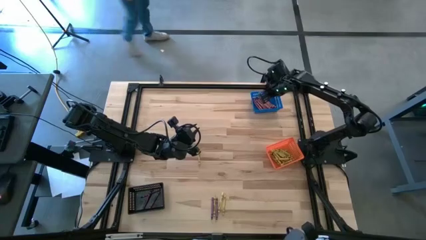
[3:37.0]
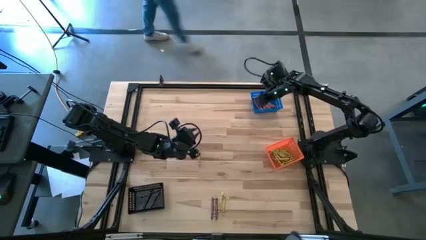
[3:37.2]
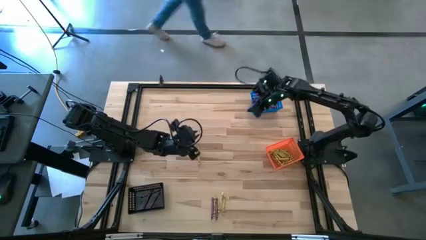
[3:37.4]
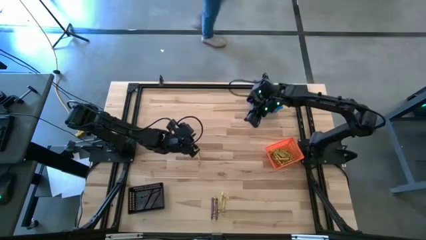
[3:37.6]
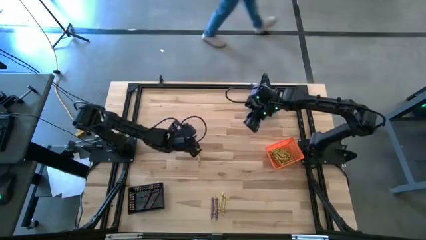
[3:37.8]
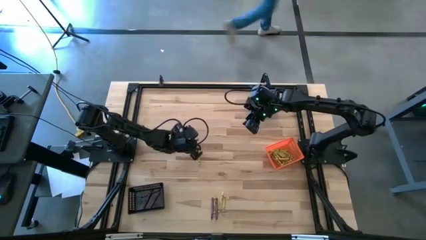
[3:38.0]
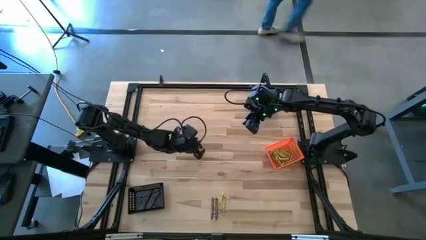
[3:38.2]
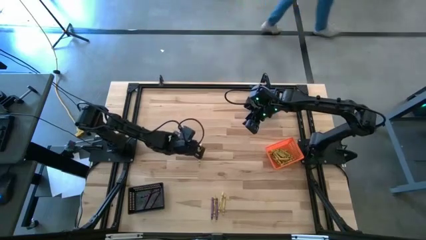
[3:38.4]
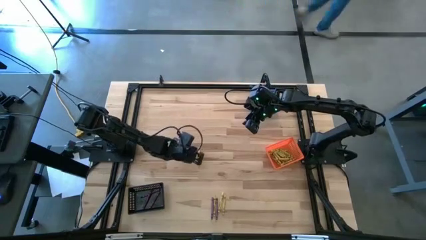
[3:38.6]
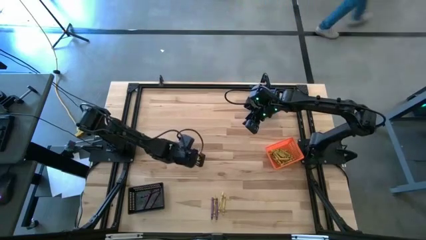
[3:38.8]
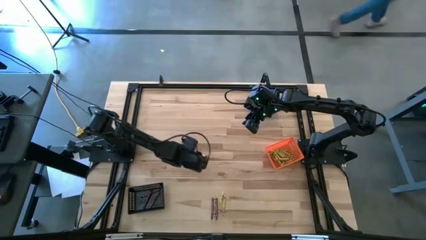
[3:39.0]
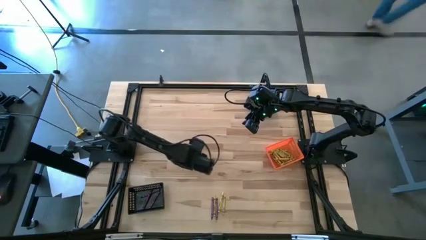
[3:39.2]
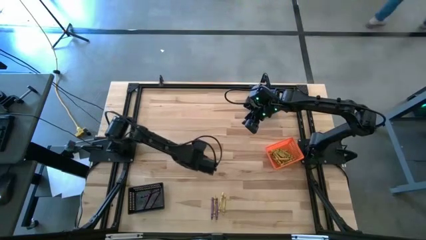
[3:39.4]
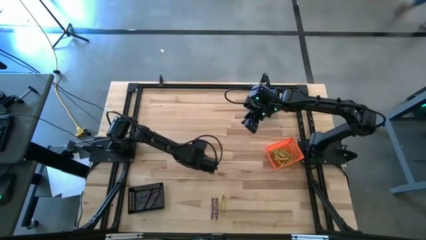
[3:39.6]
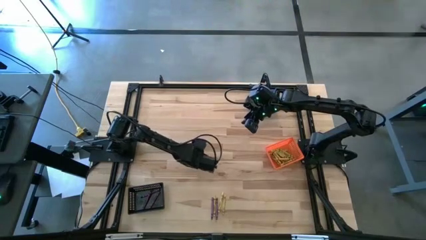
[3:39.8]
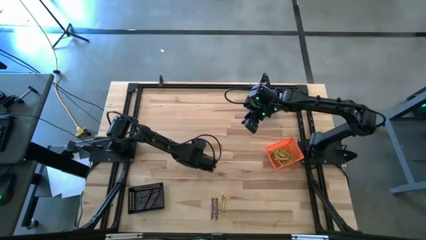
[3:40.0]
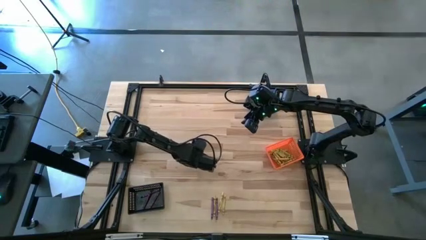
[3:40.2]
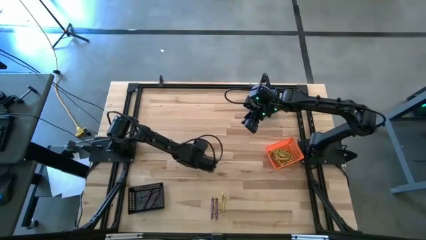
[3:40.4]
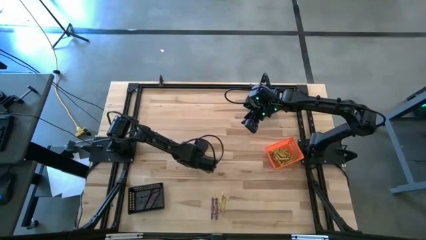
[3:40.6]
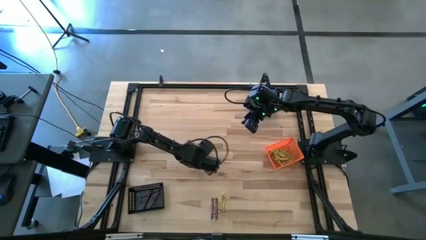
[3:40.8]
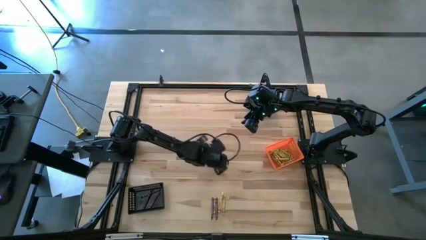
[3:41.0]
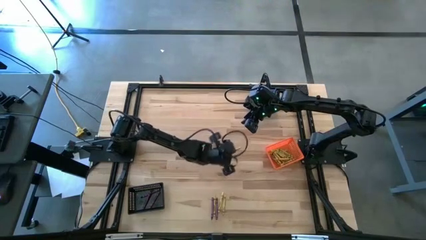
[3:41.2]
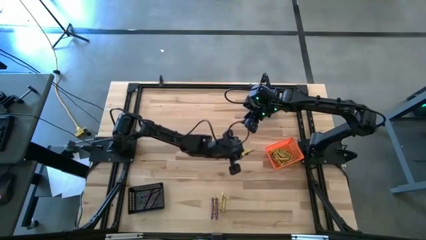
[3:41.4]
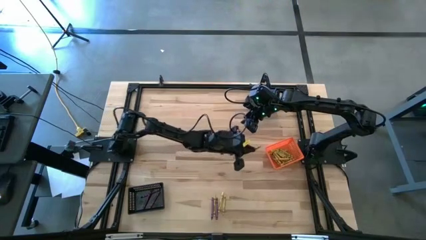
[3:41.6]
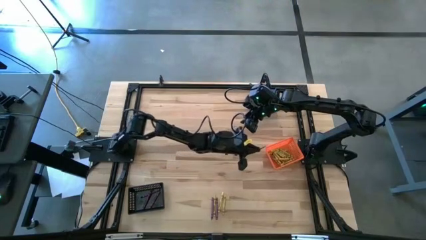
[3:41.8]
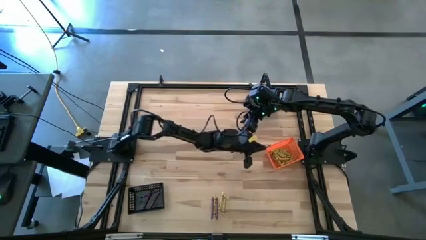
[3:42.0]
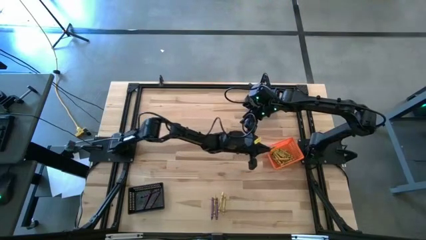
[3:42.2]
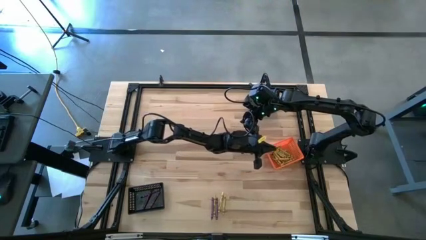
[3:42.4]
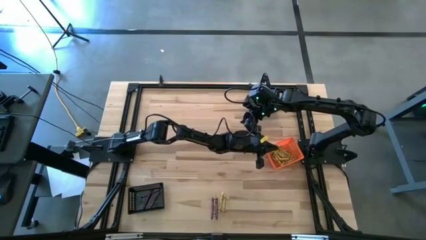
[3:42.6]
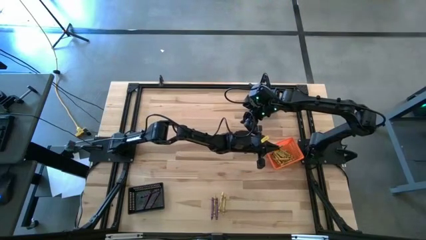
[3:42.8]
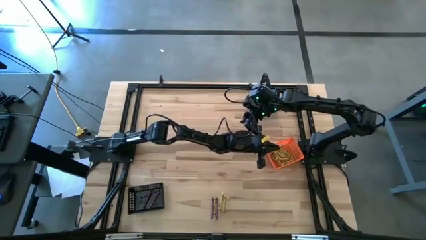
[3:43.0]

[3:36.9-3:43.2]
Task: Sort crayons
Put the yellow crayon into the orange basket

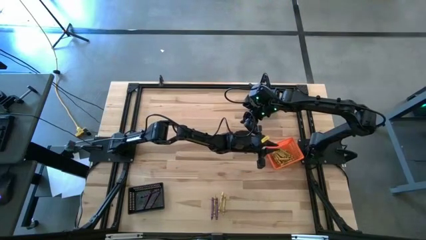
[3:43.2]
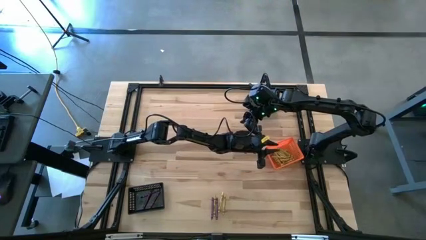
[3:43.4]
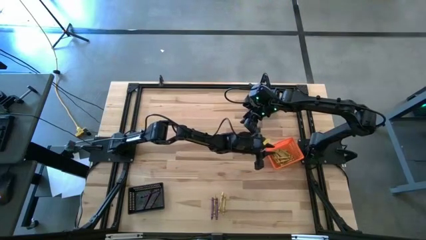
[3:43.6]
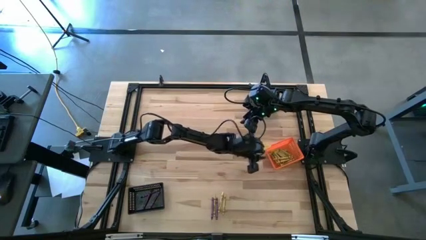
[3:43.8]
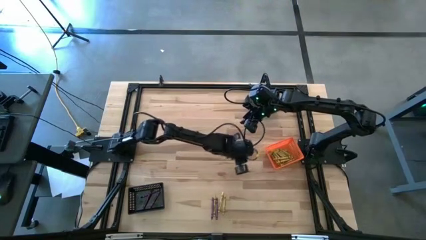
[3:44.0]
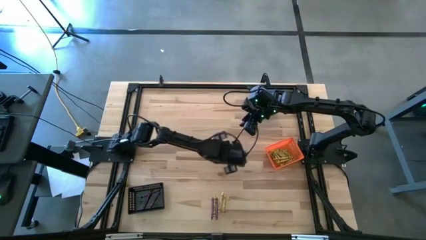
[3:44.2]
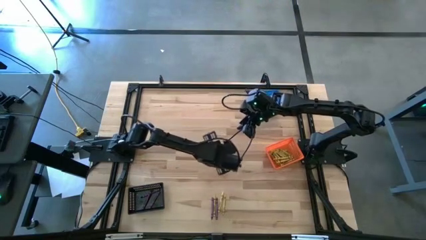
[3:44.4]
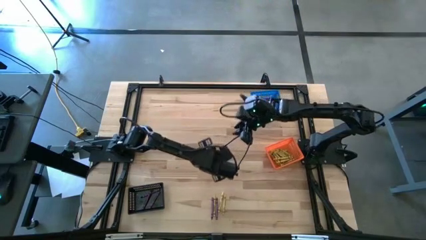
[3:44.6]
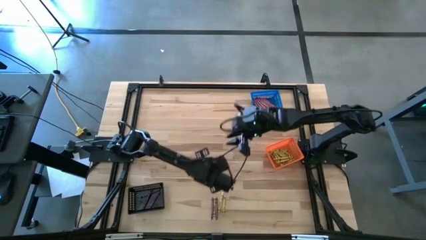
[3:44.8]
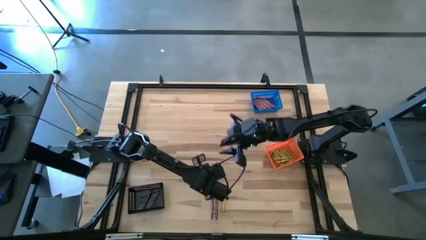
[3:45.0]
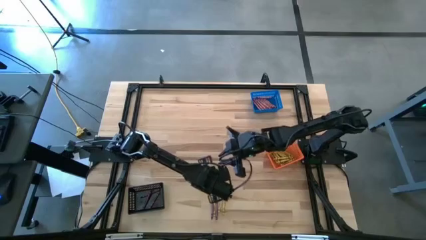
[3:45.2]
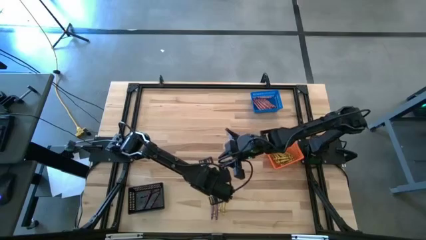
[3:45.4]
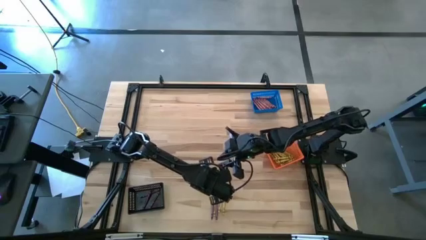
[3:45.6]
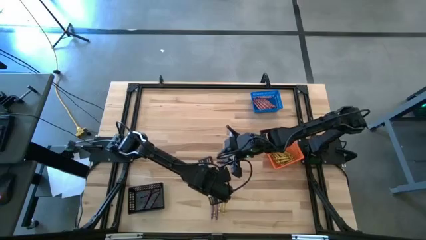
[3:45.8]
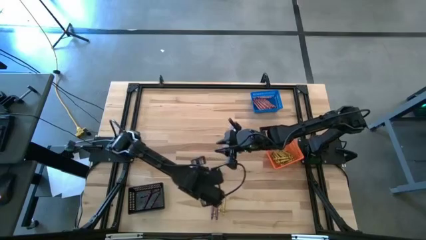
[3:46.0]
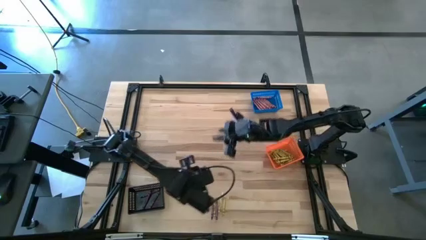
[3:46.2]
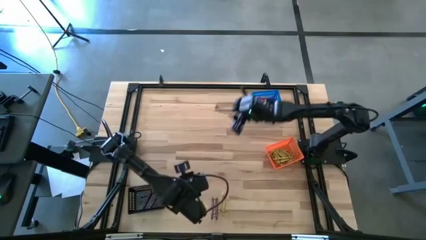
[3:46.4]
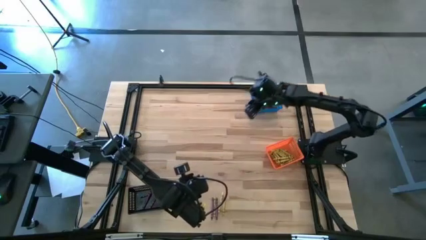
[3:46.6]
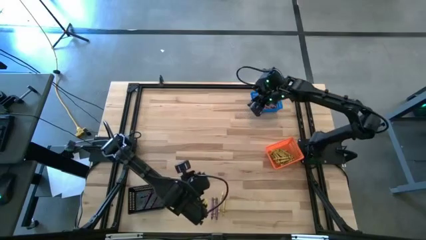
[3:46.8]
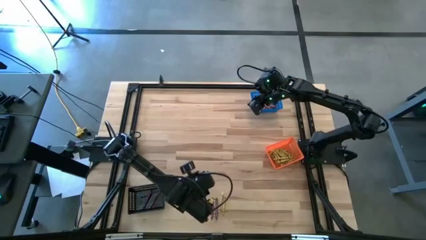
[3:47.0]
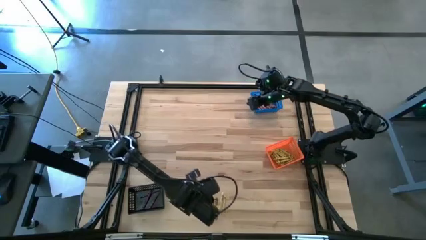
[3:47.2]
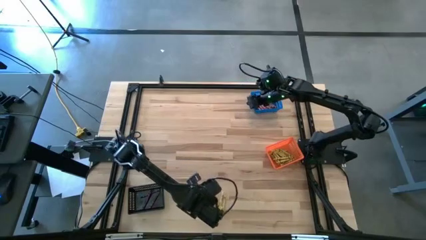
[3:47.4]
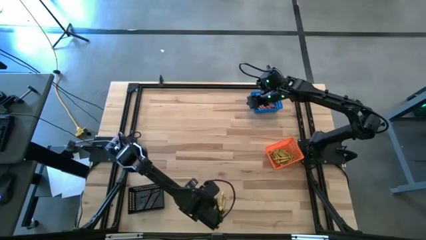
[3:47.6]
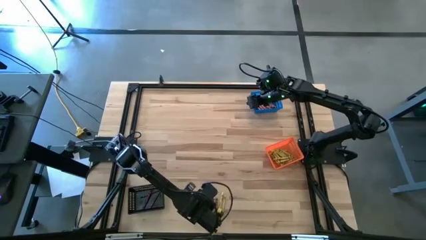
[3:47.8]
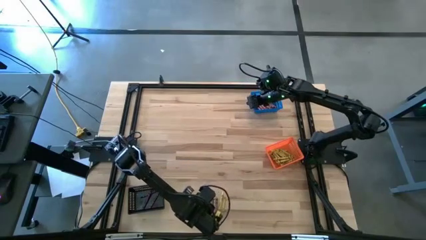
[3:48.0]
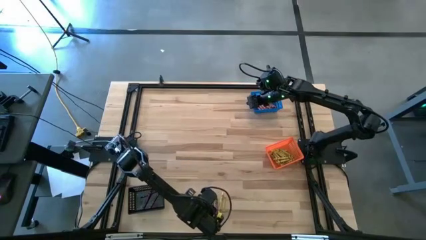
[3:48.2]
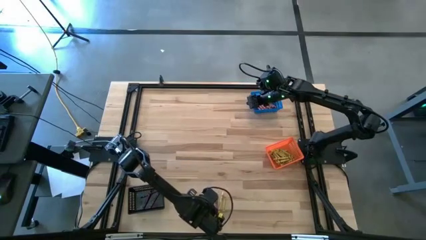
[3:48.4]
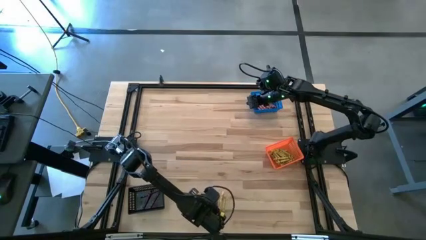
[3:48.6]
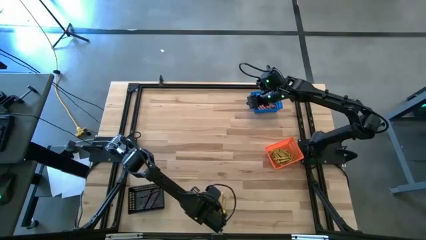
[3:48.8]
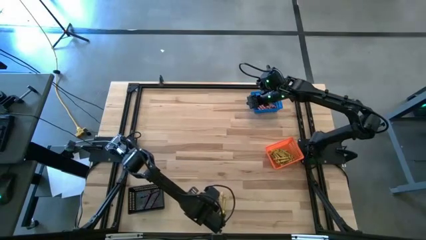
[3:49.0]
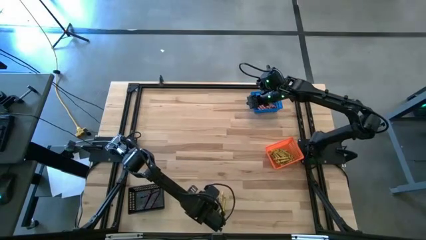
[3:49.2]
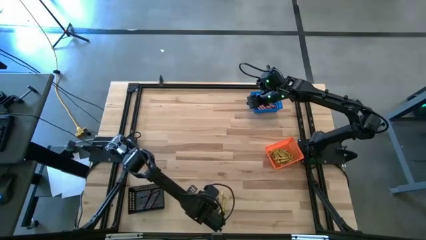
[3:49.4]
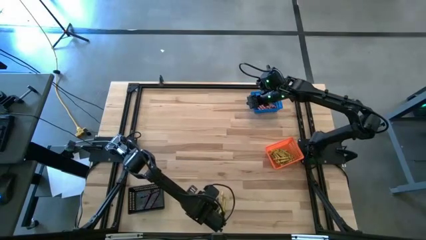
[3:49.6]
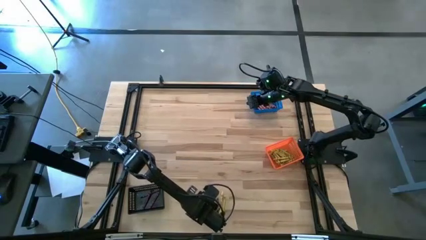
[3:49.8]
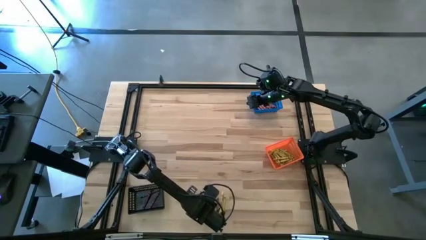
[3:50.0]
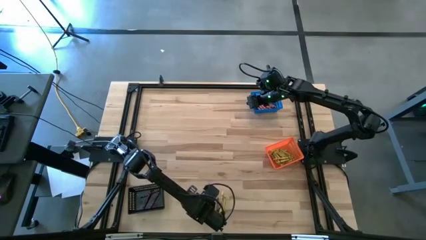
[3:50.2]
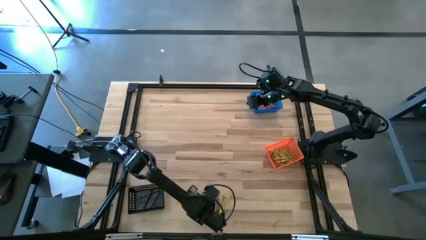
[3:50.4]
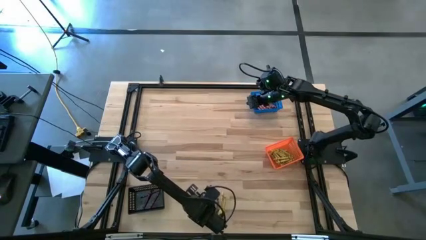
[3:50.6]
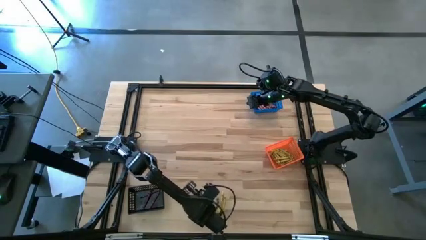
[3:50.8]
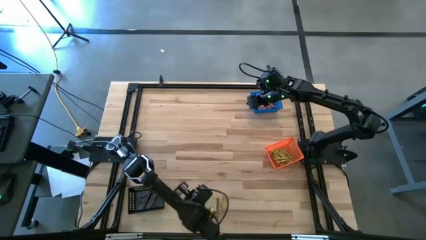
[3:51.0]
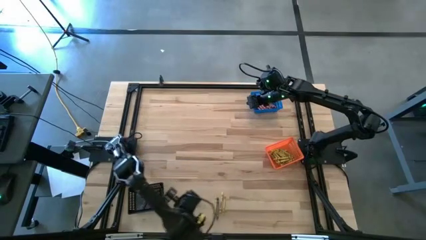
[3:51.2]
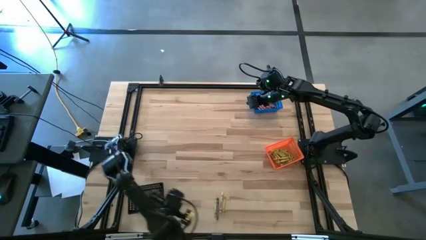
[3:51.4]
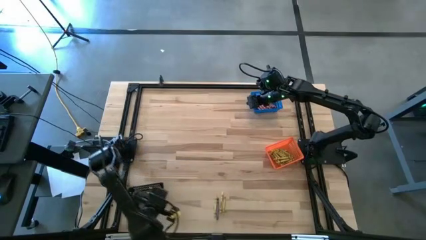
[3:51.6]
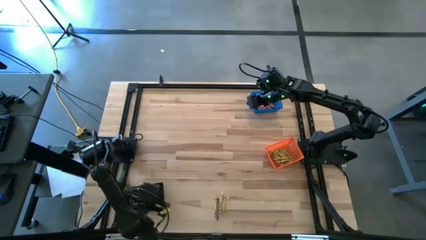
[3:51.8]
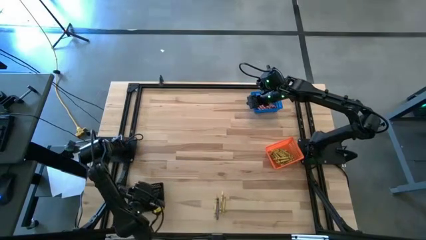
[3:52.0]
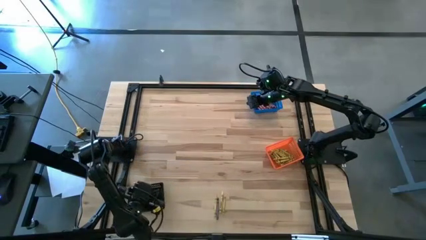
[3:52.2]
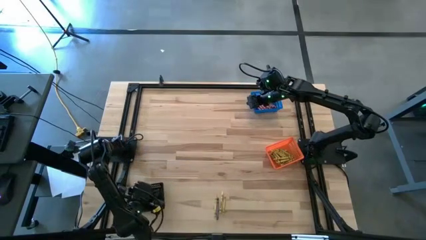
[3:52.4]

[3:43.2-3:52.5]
Put the violet crayon into the black basket
